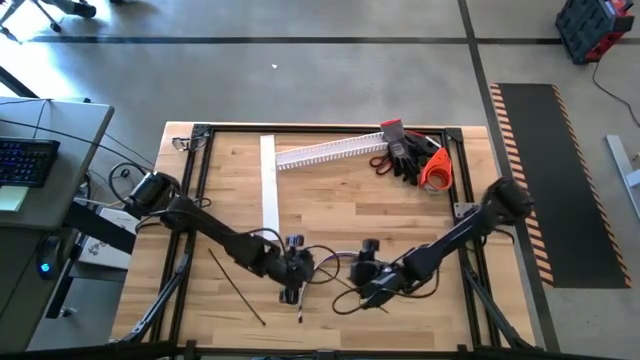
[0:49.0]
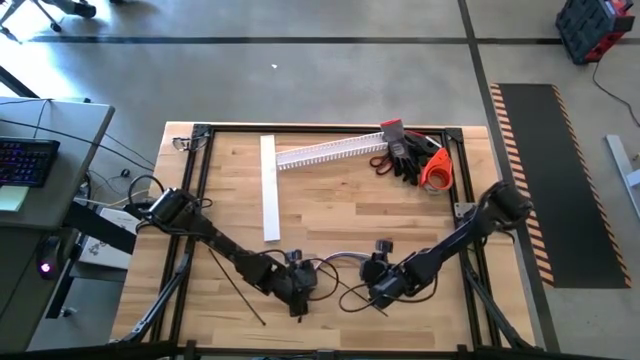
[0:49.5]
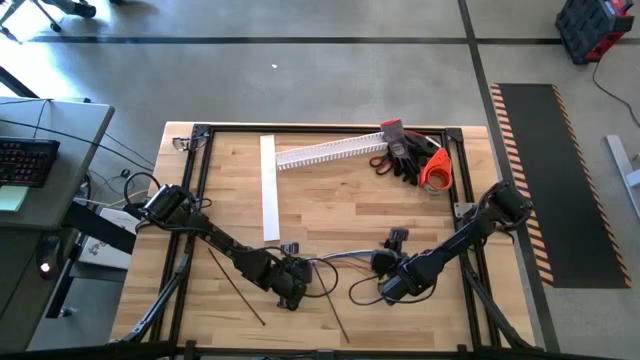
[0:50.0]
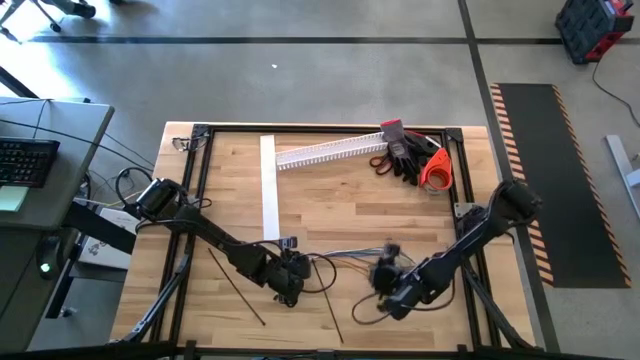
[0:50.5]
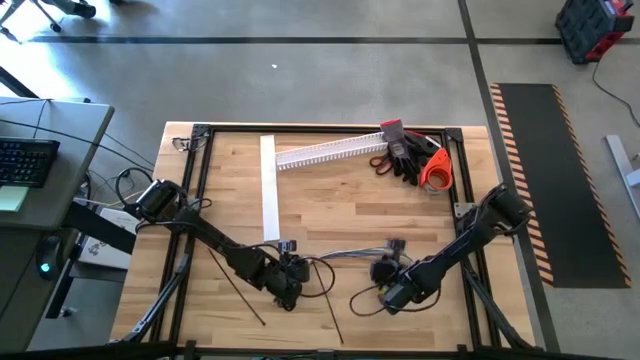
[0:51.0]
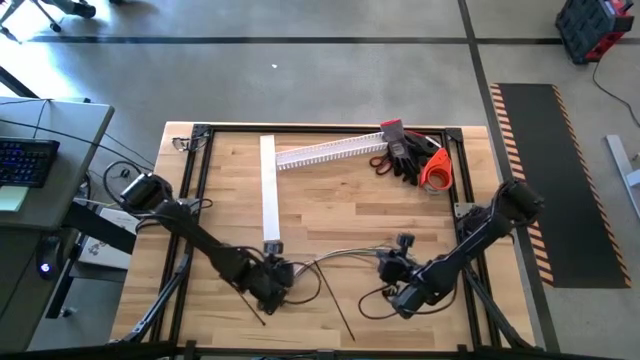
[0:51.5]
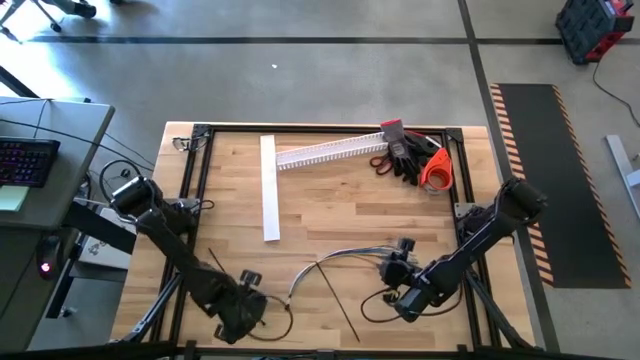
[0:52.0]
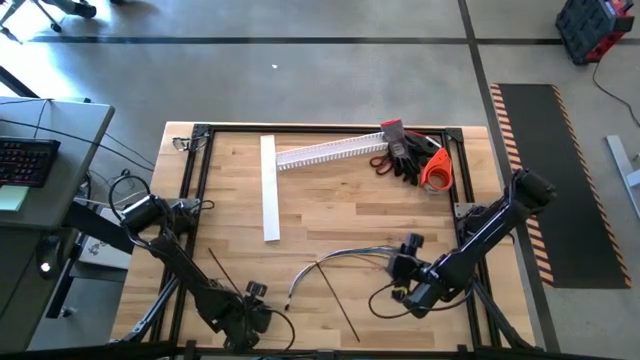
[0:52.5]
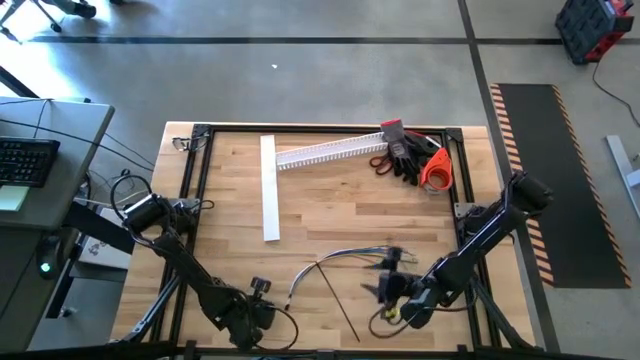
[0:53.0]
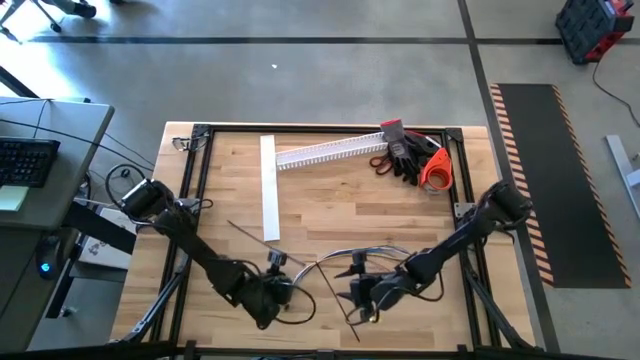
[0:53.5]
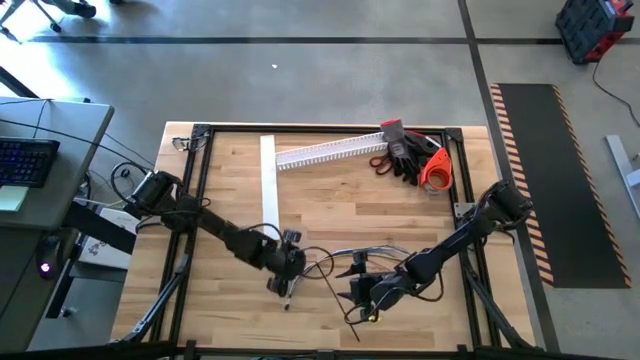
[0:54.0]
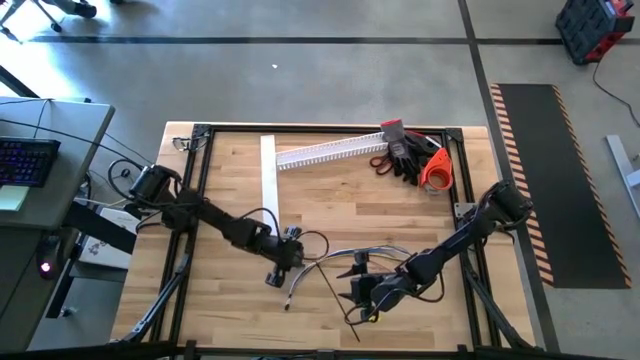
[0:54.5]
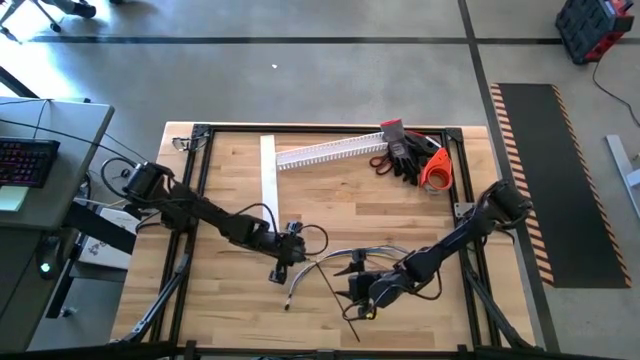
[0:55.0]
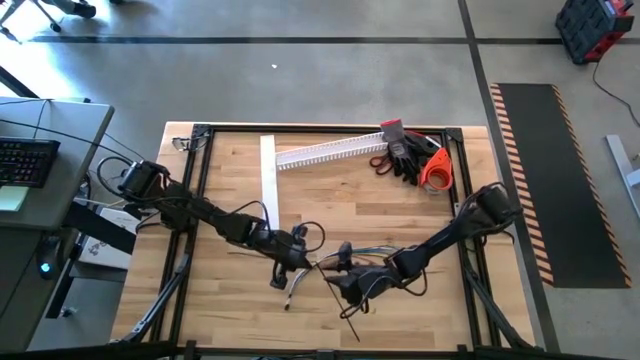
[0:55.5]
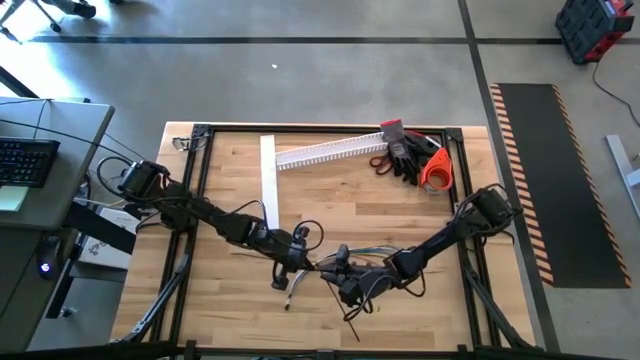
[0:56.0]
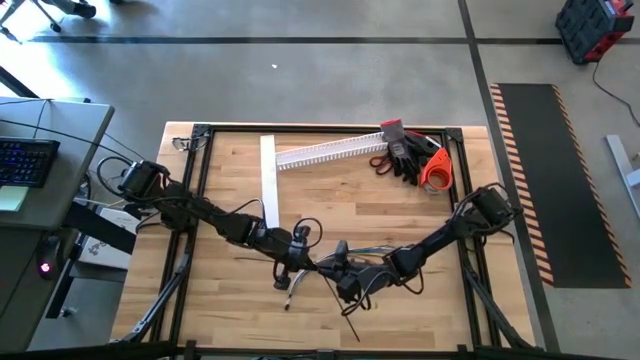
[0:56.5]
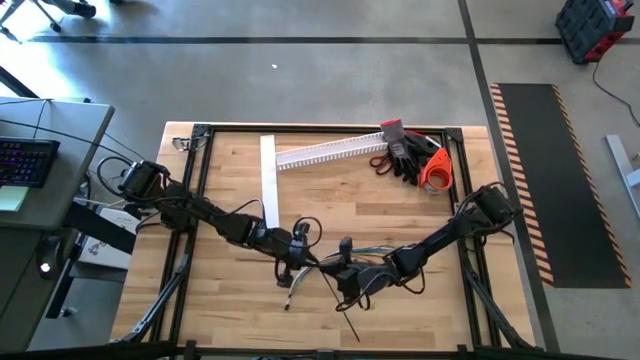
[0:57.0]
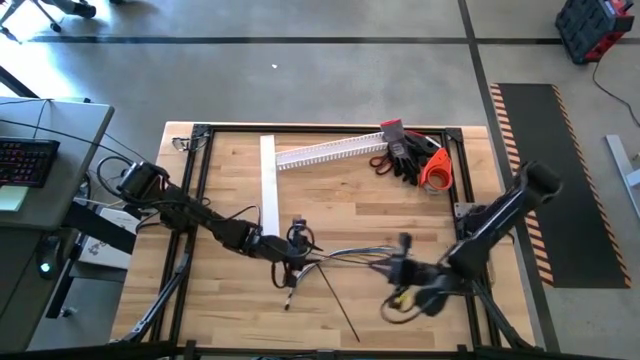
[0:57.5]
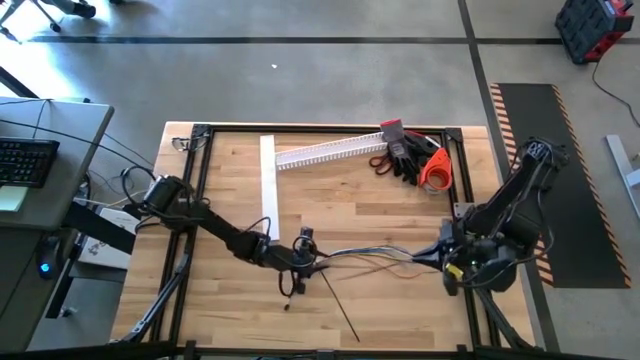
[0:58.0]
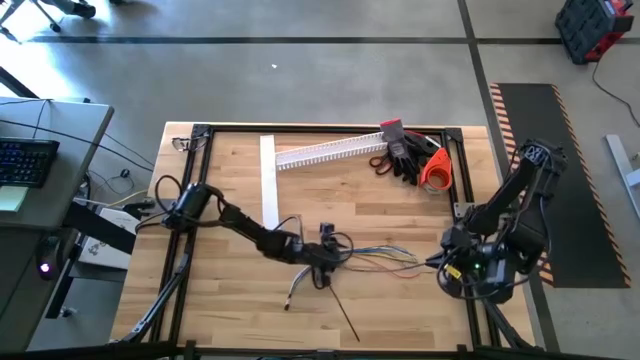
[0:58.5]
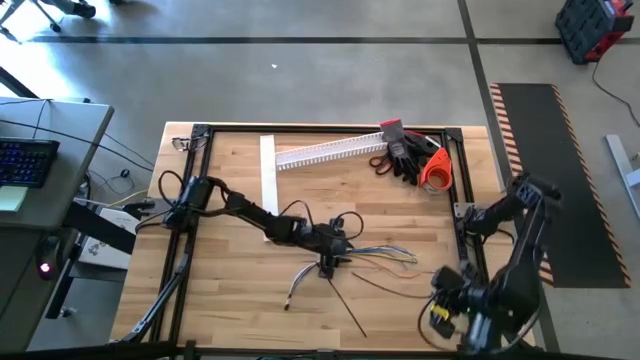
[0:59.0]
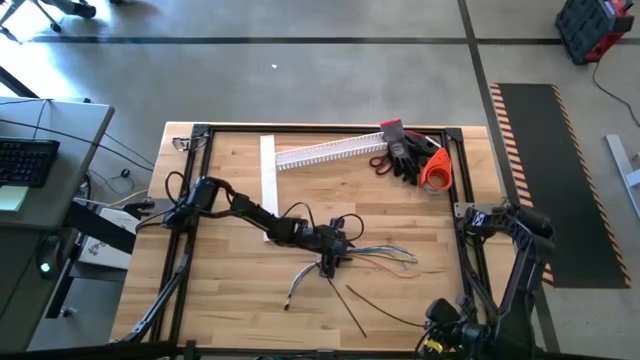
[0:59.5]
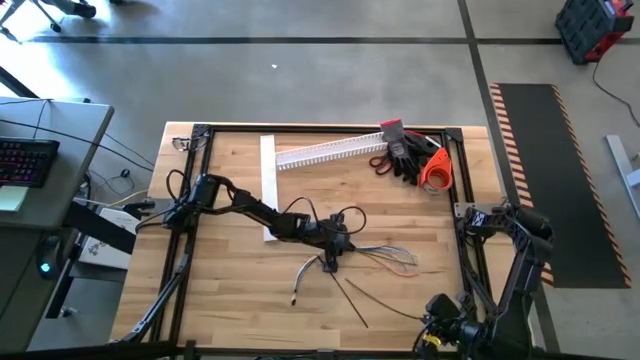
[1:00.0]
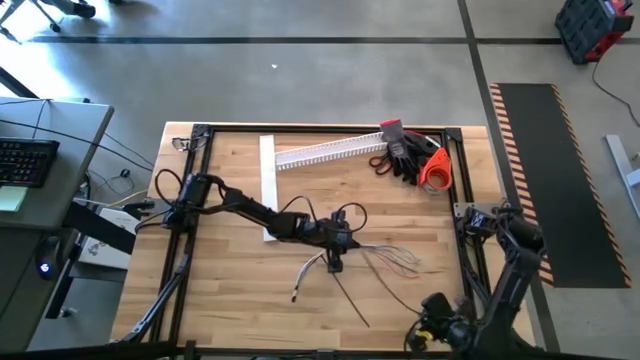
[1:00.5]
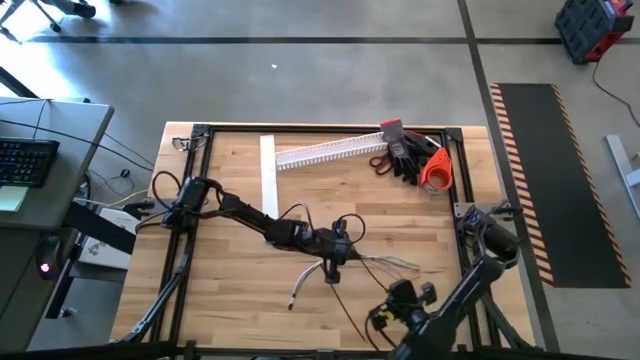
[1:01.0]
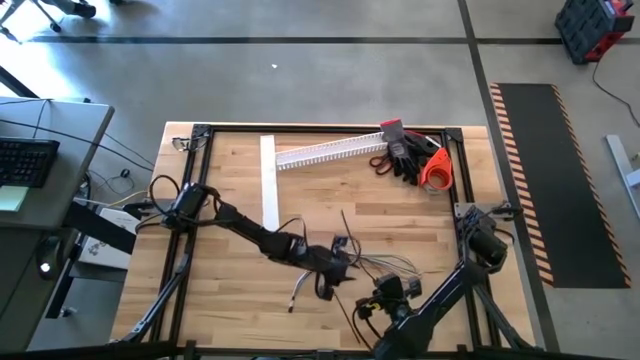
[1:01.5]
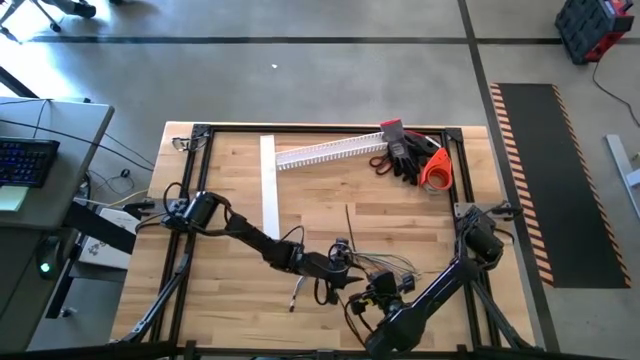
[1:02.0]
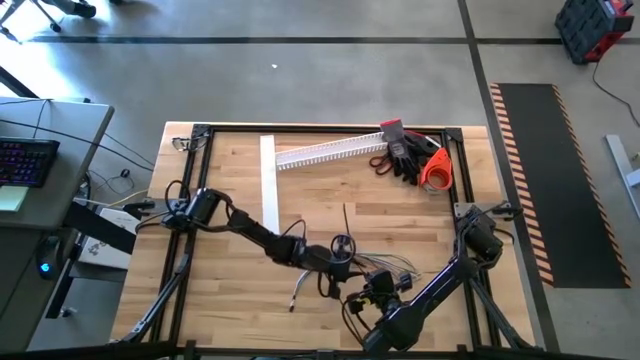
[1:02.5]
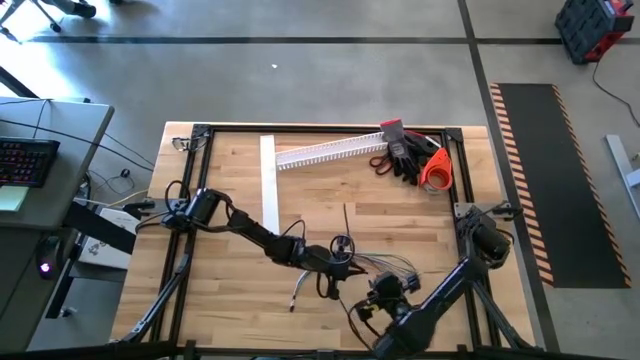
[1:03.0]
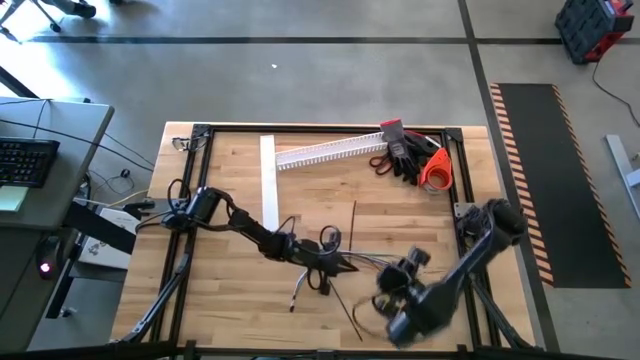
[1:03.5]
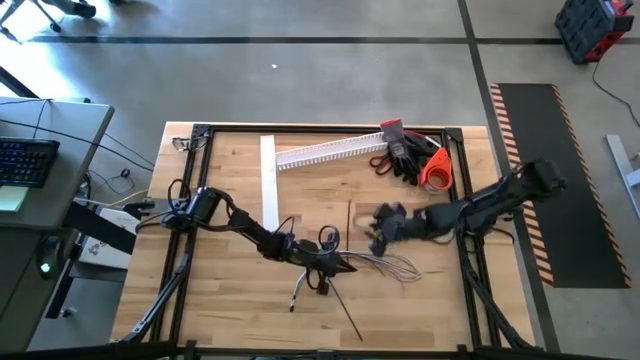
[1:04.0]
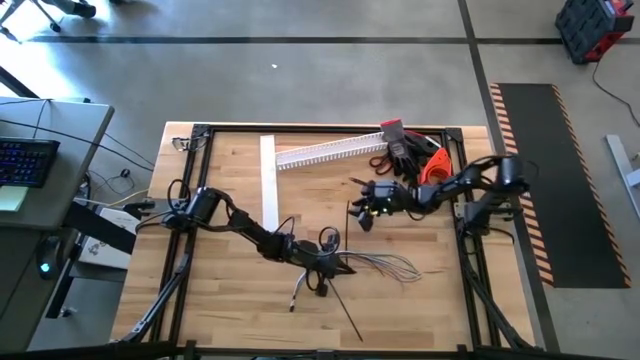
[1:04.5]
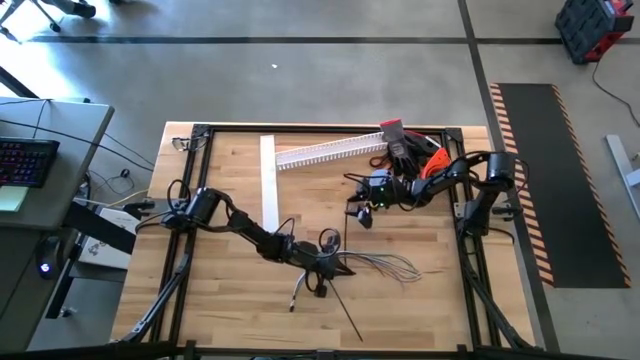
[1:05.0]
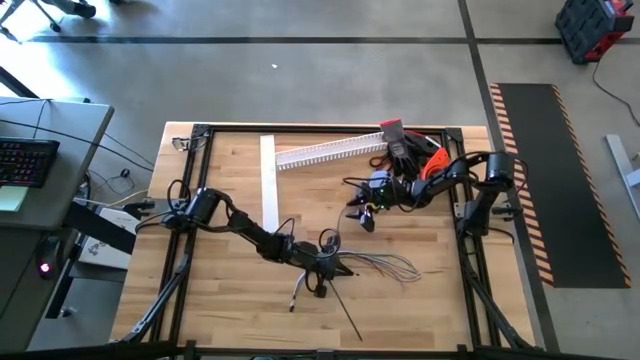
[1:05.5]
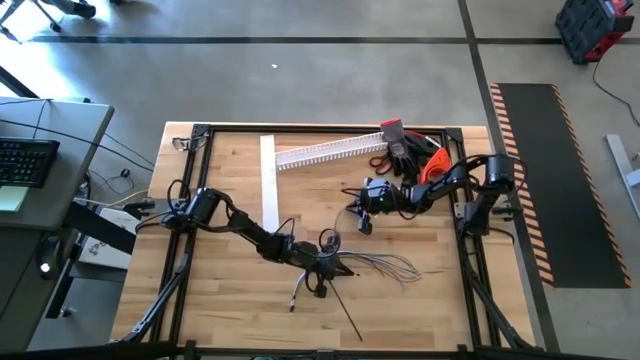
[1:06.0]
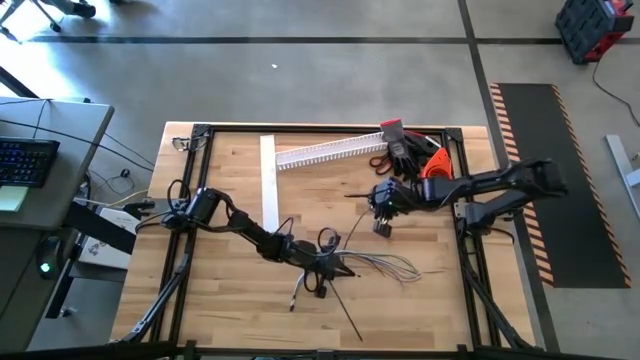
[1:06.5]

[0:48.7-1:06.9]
Task: Ziptie cables
Wrap the cable wires with the black zip tie

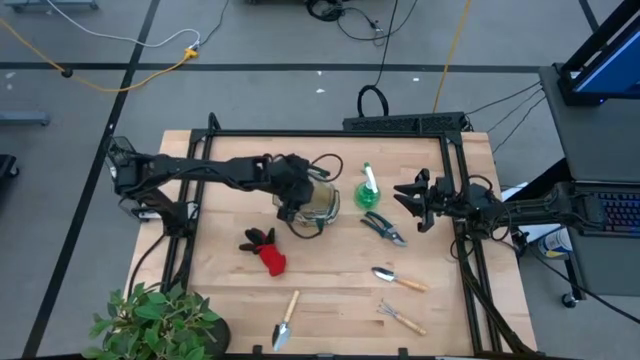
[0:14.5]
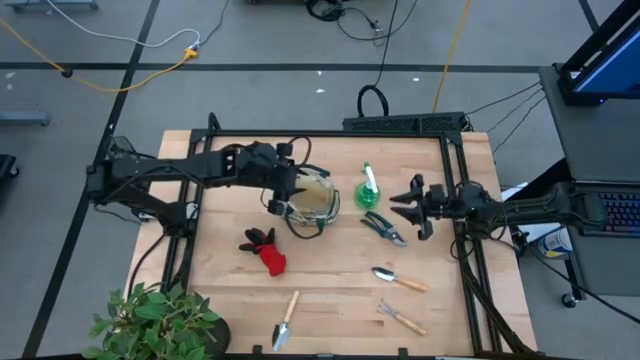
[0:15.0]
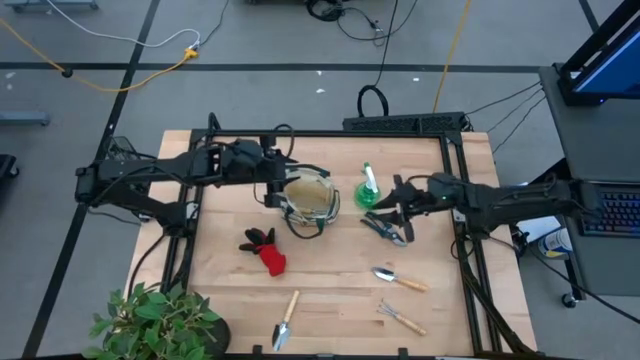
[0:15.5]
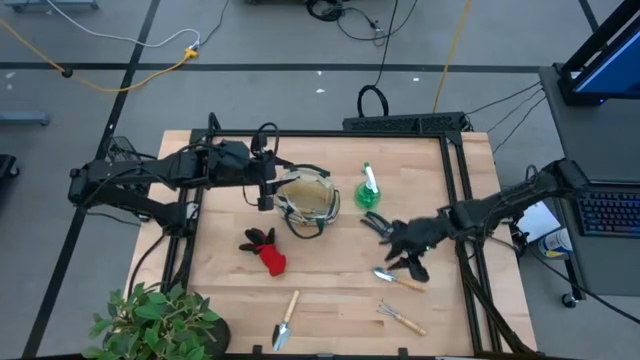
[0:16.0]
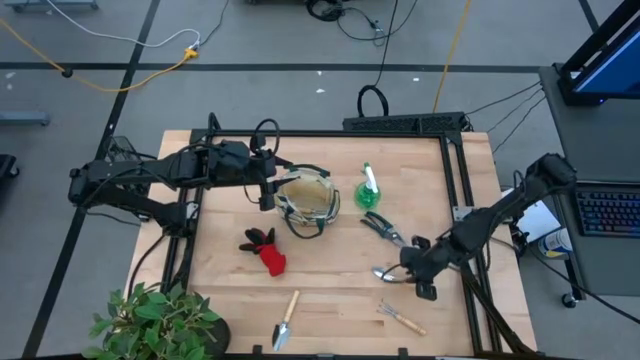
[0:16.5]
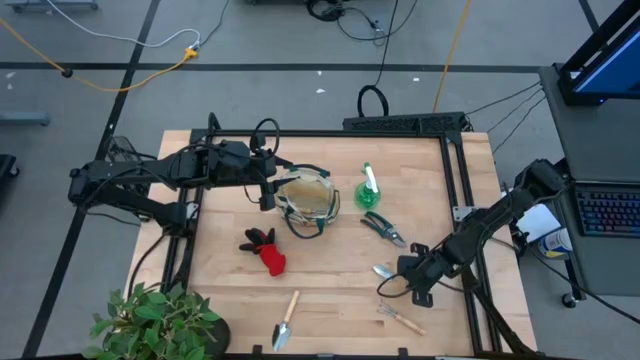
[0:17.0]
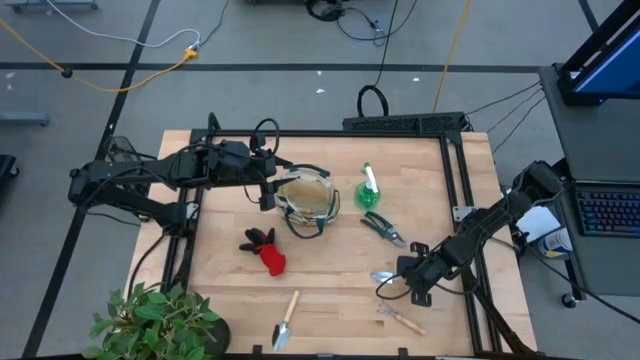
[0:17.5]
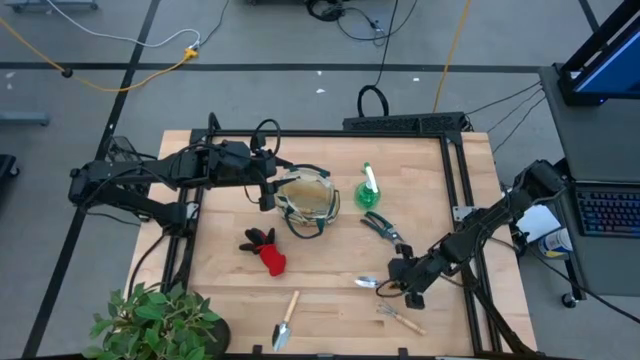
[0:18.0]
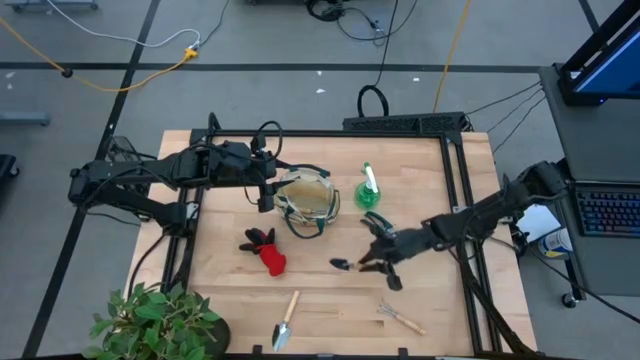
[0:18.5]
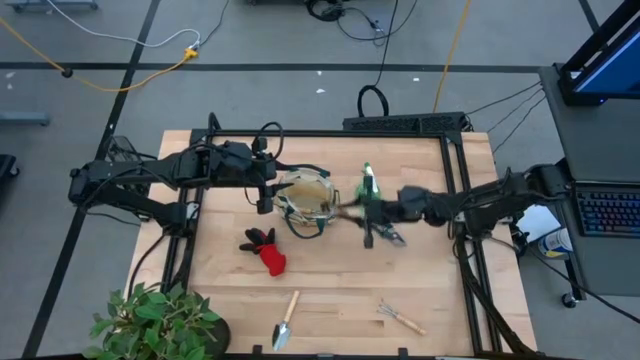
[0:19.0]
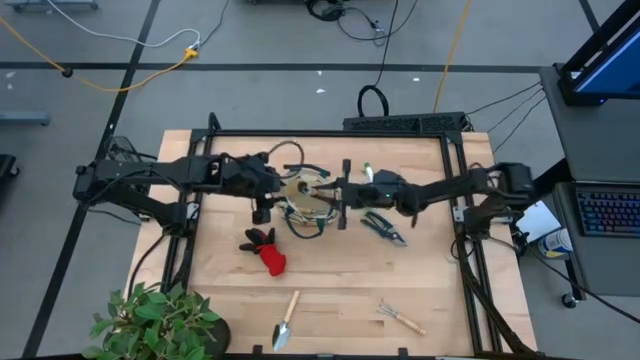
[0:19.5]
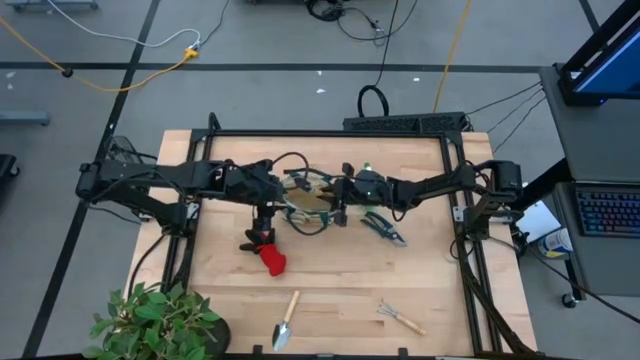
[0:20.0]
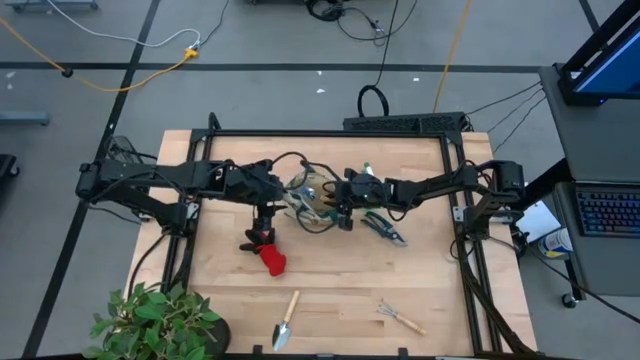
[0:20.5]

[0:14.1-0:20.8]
Task: Pick & Place Garden tools in Gardening bag
Put the right brown trowel into the light brown gardening bag
